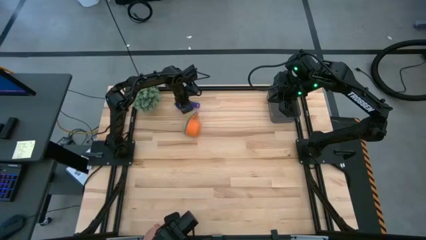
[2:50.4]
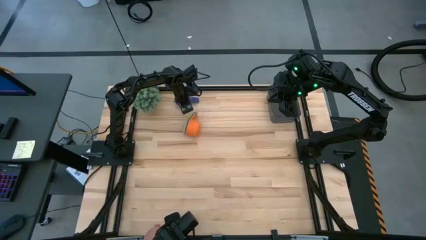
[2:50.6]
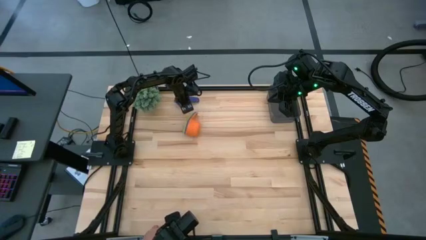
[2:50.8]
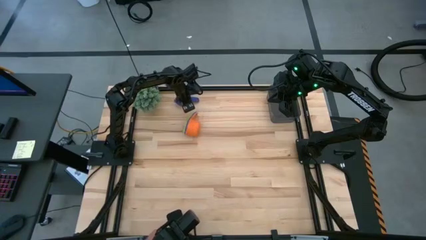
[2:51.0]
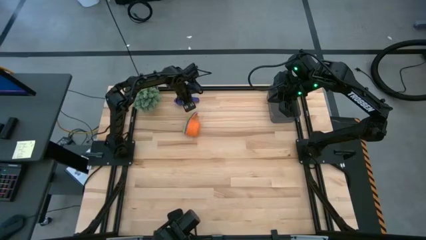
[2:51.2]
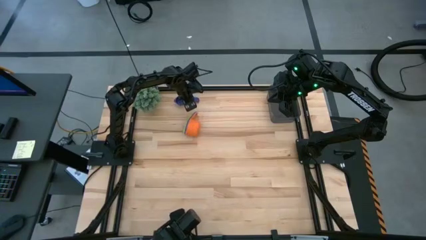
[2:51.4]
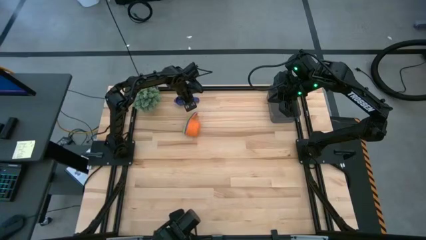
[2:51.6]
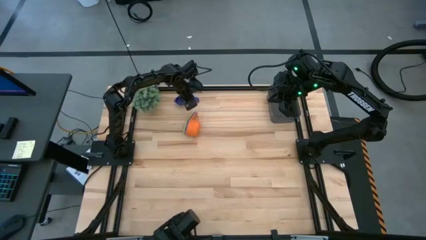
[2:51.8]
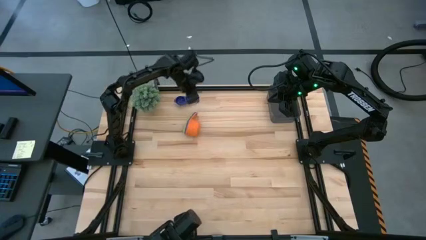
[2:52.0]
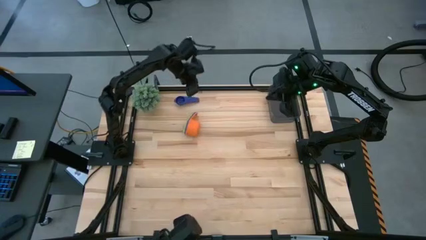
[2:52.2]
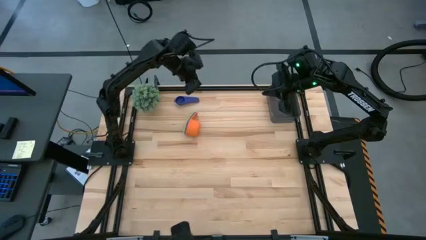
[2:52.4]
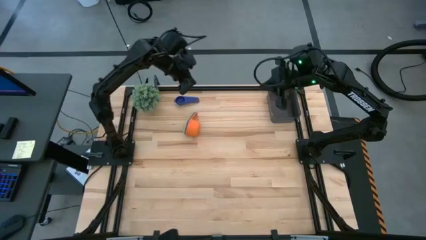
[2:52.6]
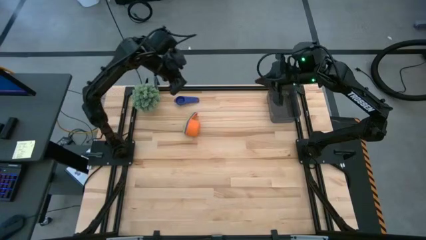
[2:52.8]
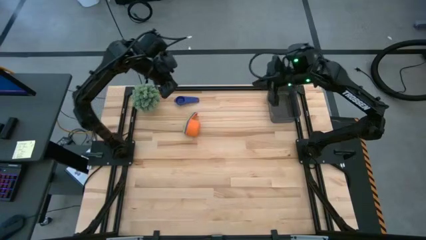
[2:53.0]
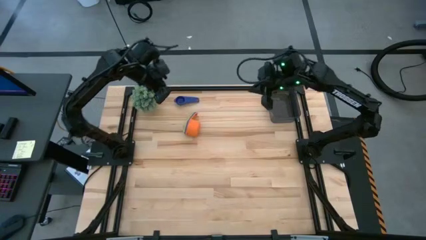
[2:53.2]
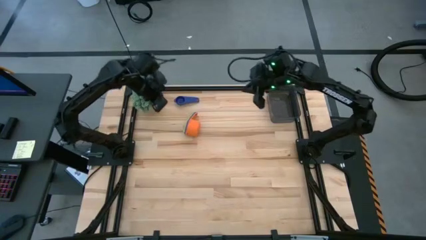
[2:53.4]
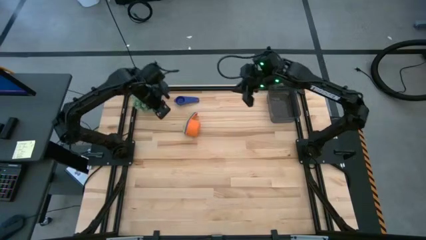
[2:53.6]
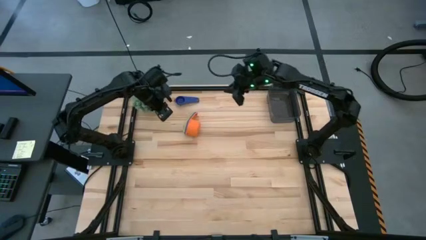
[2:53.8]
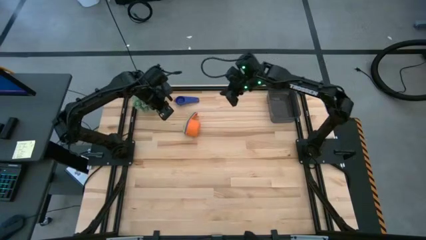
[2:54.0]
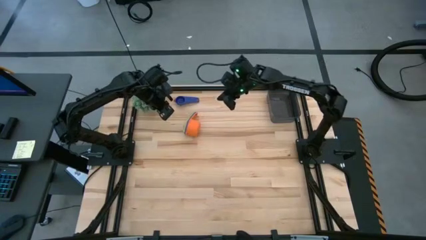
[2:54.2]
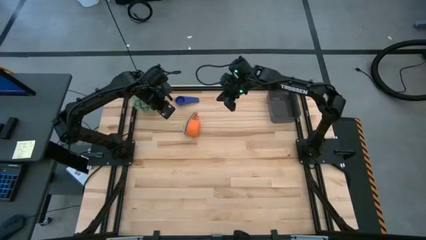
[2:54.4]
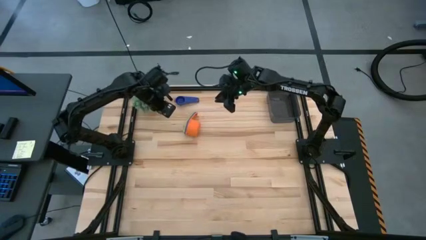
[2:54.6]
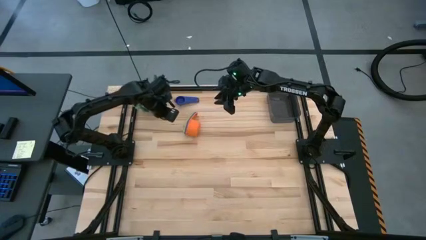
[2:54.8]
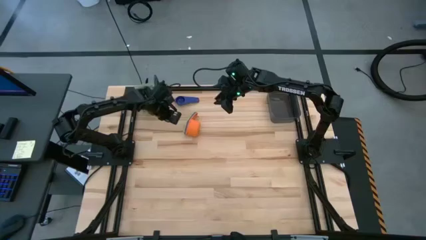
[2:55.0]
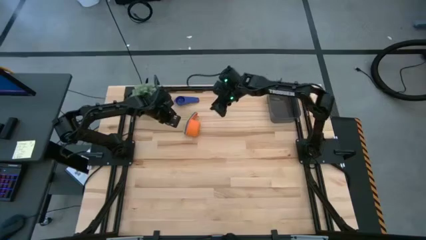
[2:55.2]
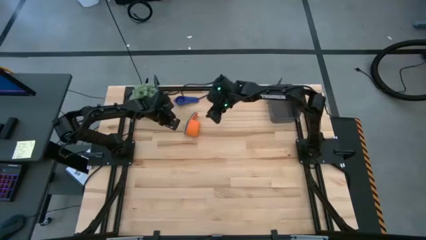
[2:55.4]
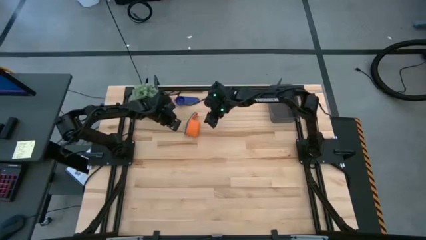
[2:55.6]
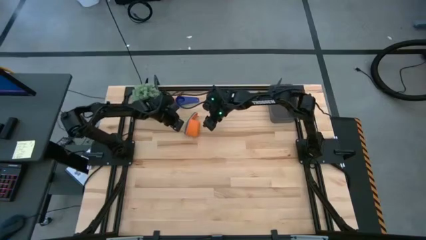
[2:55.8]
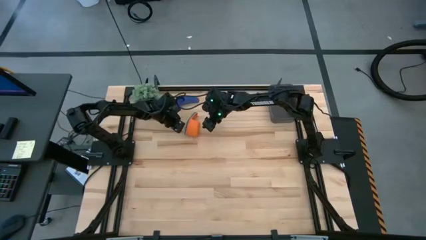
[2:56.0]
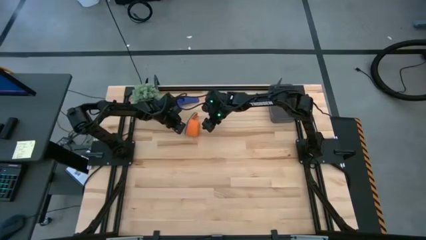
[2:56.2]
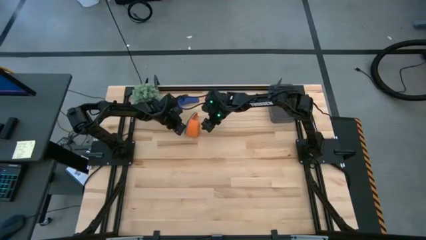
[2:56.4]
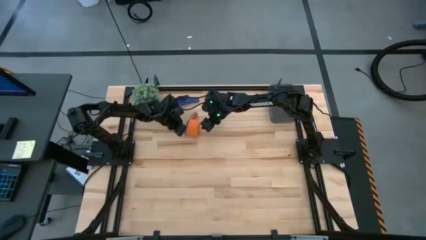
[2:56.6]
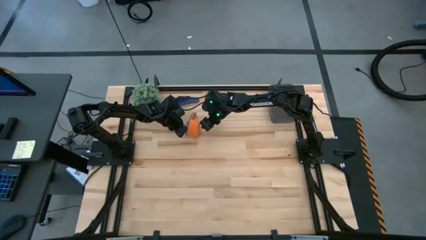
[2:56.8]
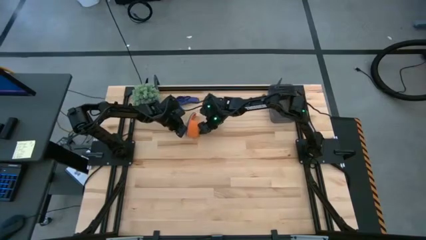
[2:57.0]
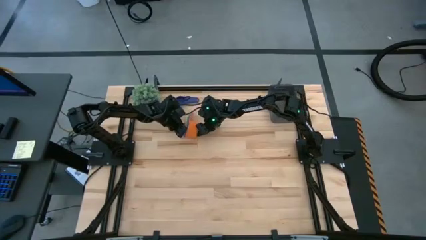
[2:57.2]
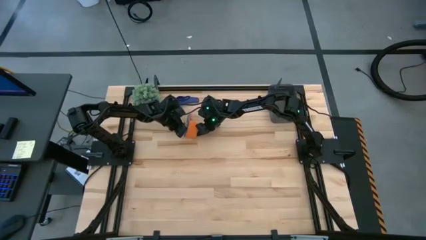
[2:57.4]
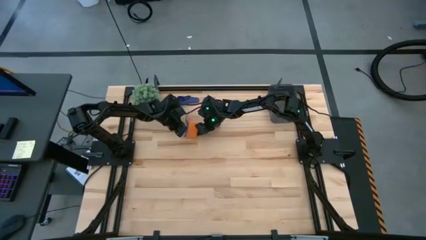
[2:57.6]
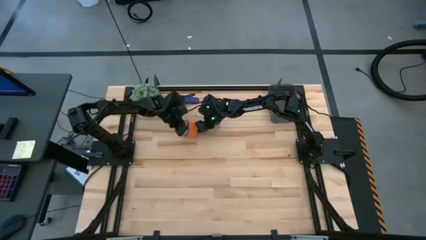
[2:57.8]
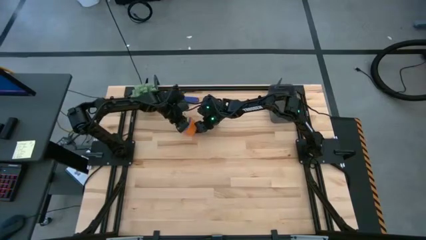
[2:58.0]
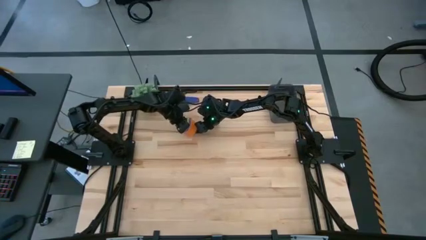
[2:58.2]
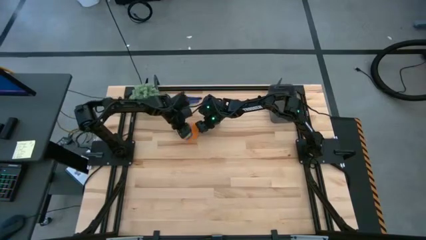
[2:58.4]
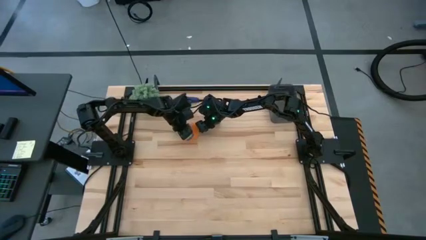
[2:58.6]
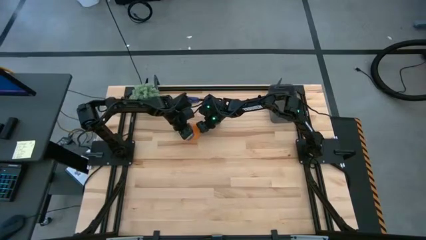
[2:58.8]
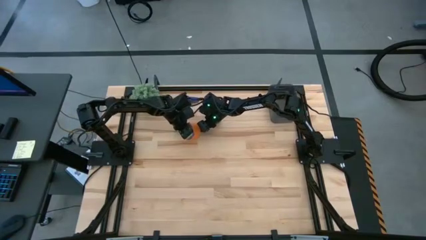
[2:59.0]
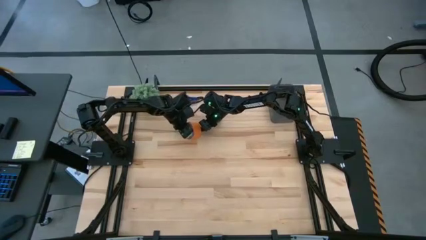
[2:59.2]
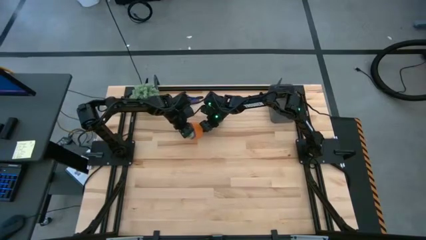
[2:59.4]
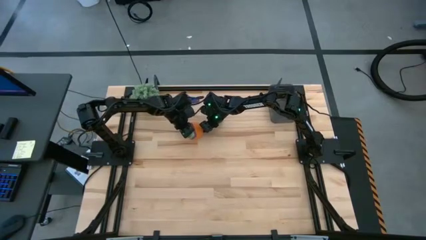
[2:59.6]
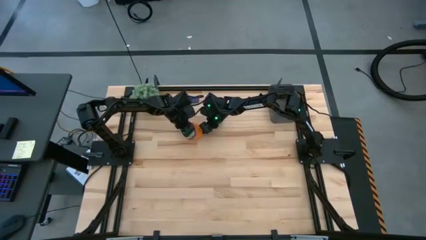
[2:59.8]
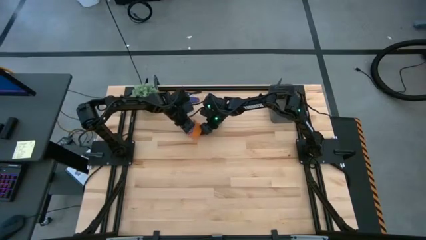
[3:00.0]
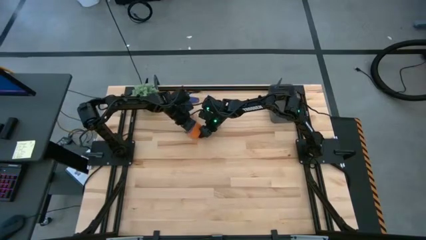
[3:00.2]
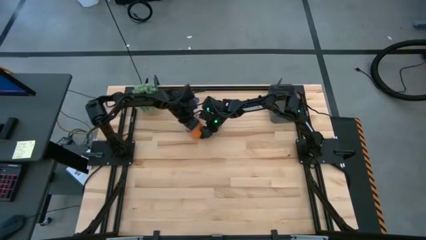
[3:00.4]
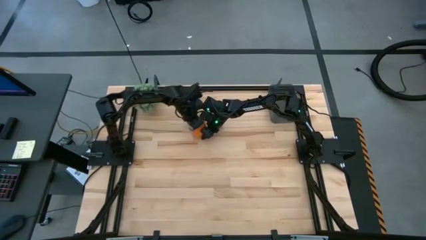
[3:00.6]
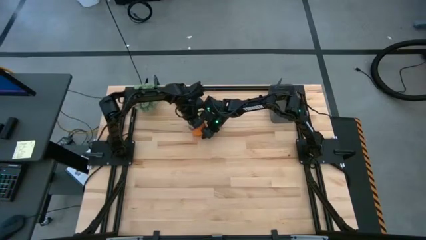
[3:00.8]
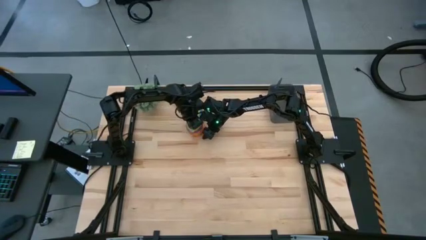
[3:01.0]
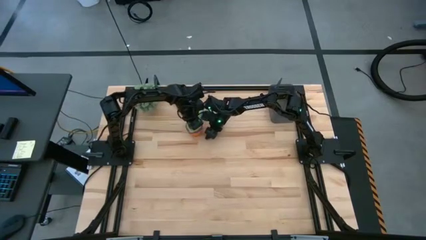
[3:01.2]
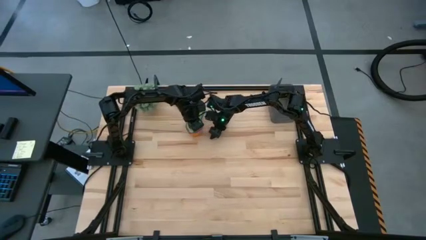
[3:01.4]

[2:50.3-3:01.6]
Task: Nest measuring cups in basket
Adjust the stacked measuring cups

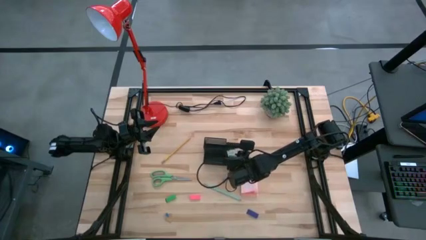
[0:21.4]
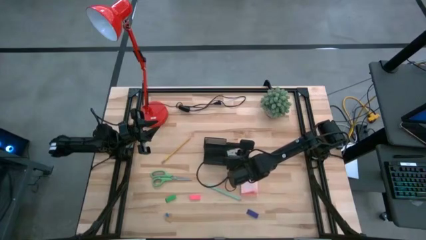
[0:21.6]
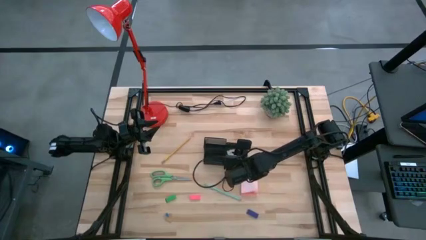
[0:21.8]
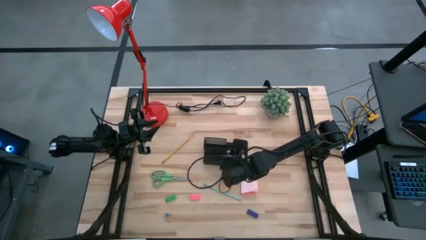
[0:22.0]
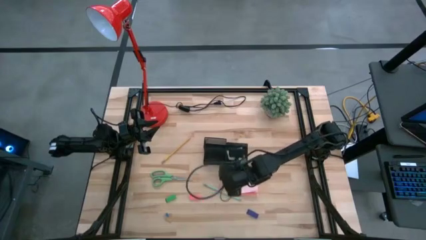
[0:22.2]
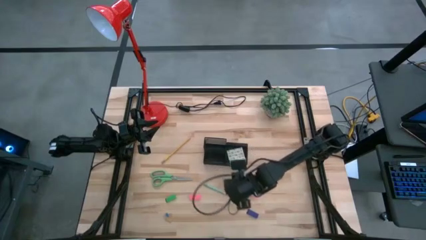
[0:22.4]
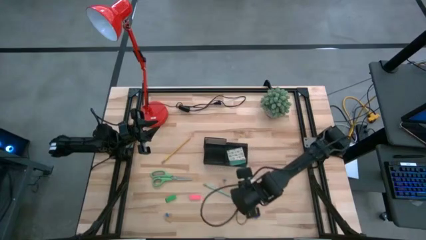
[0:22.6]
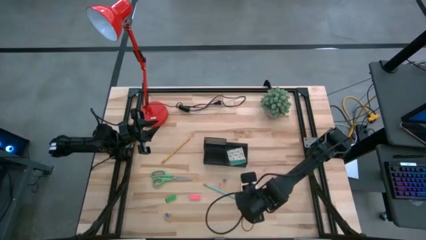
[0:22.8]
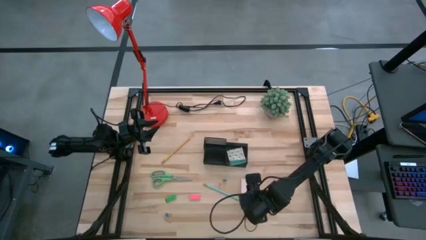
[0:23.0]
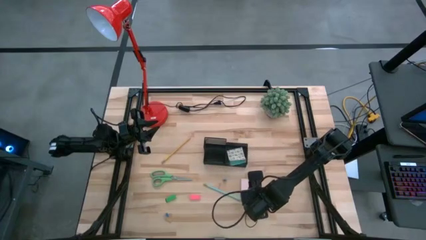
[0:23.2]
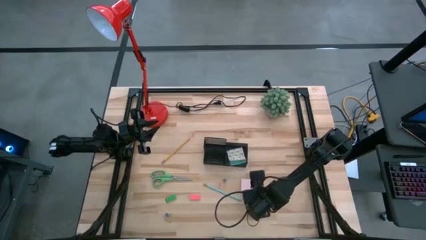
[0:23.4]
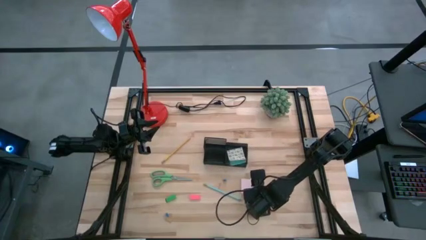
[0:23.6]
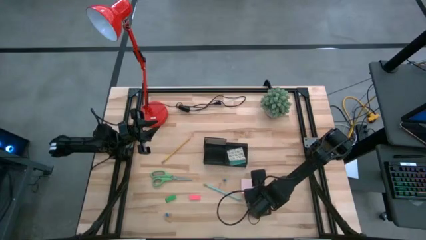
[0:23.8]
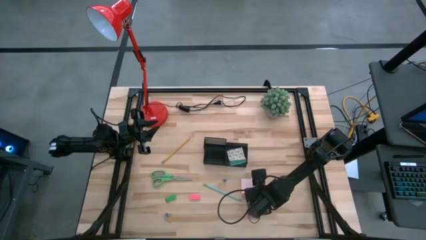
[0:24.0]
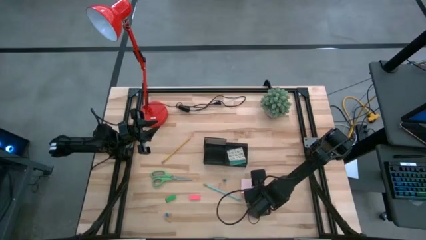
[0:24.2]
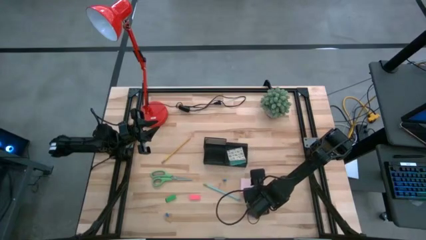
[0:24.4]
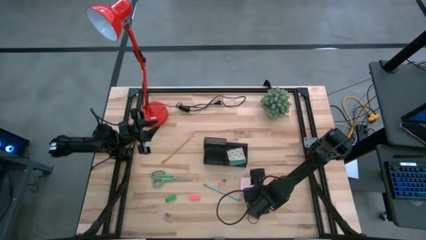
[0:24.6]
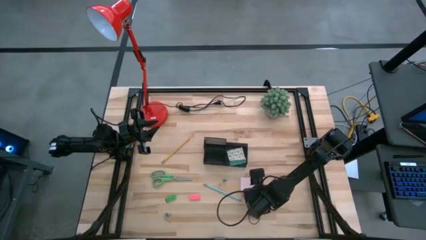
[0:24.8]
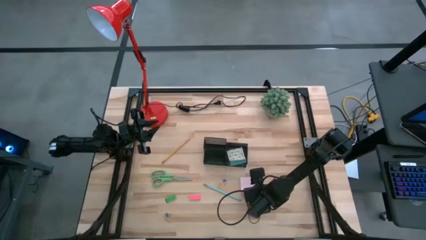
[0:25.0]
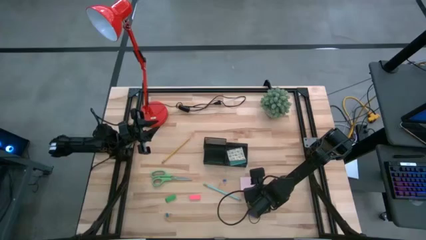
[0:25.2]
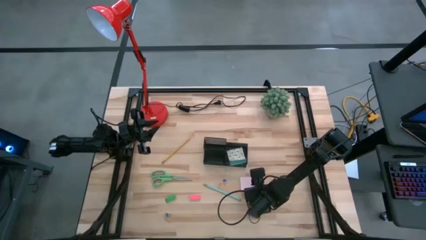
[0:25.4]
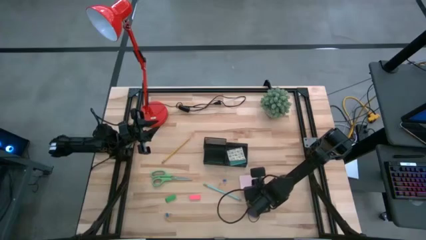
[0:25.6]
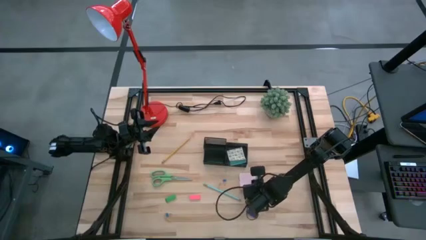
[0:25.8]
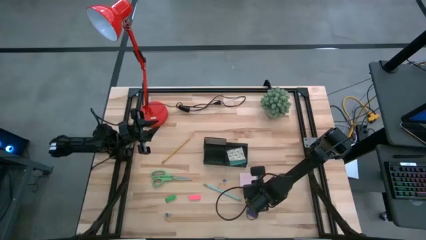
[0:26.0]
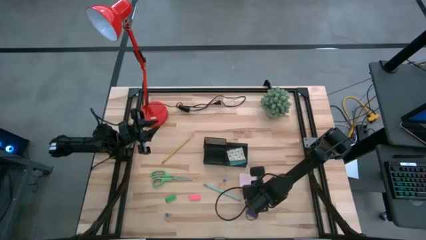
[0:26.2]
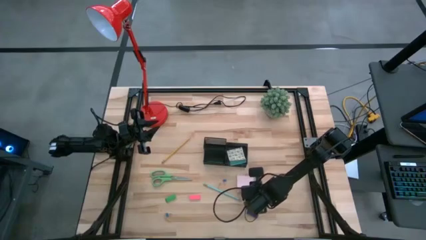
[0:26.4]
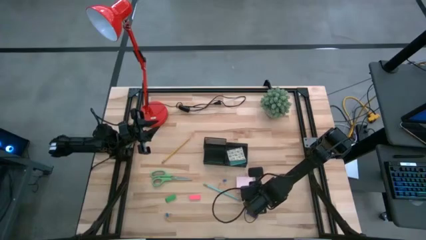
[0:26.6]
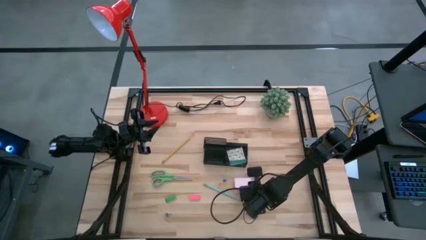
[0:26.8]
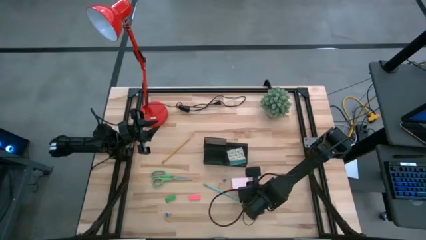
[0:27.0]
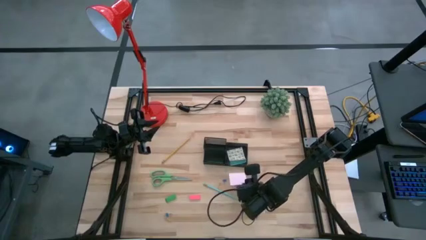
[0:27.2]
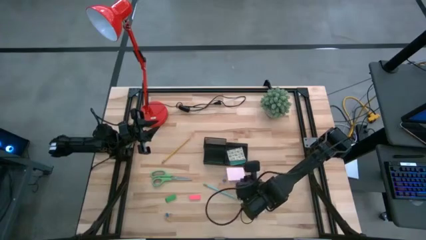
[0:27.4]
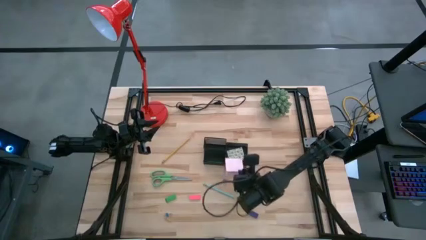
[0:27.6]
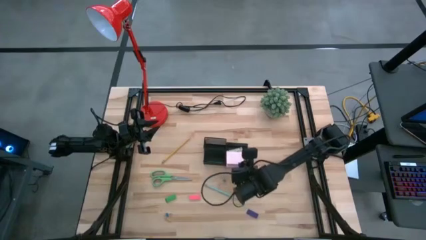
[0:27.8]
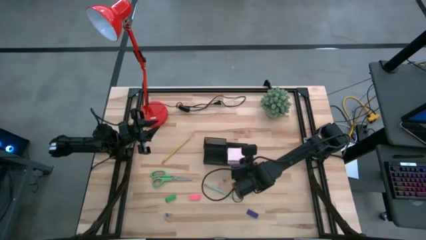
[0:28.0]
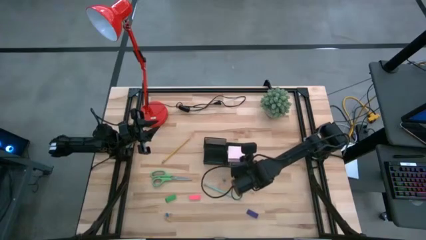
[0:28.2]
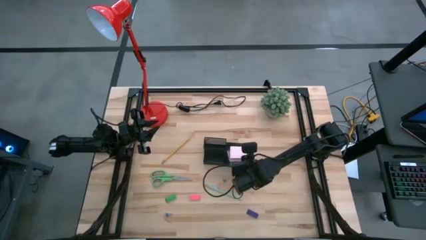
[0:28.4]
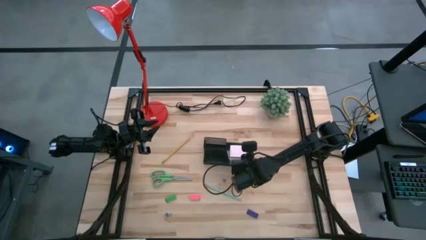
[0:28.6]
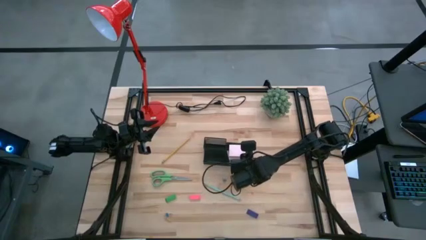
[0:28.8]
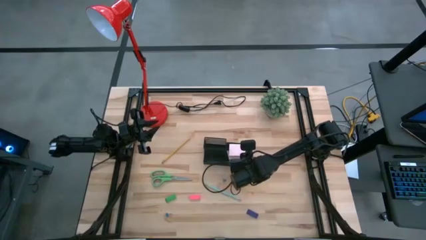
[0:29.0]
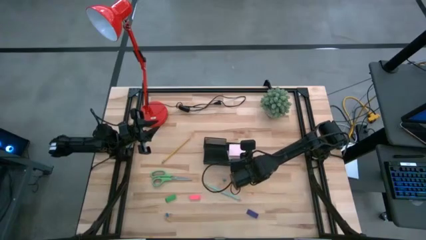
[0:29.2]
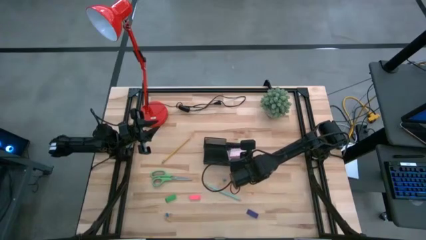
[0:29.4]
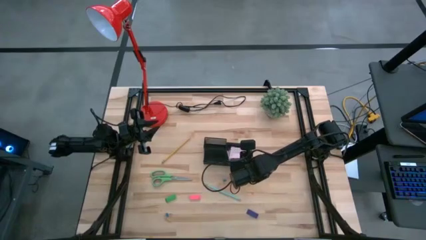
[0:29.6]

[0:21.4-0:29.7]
Task: Pick and place office supplies into organizer
Put the pink sticky notes into the black desk organizer
